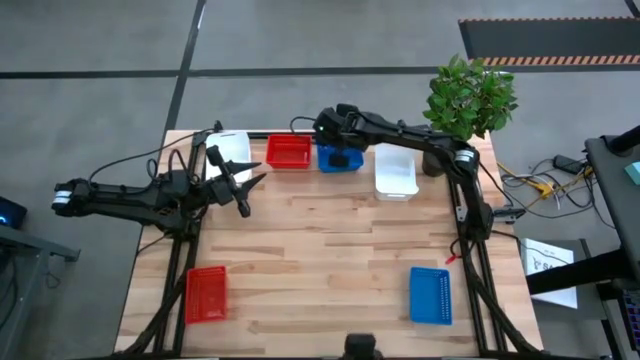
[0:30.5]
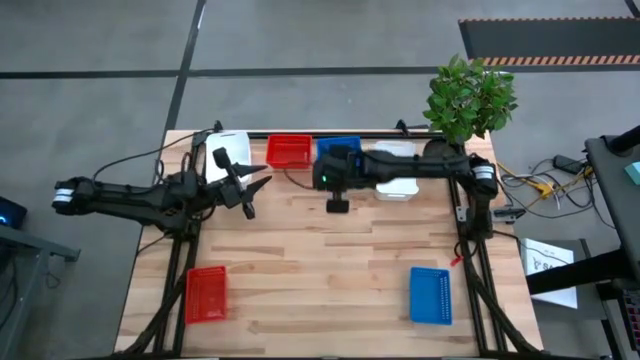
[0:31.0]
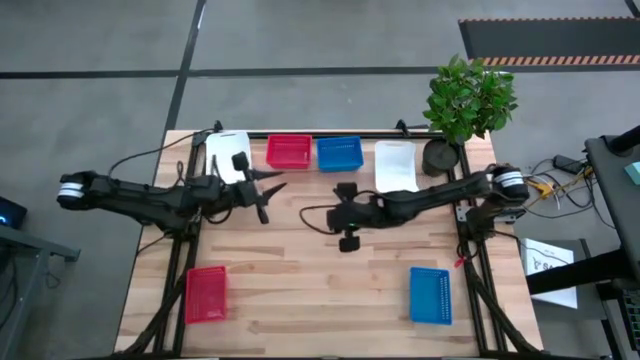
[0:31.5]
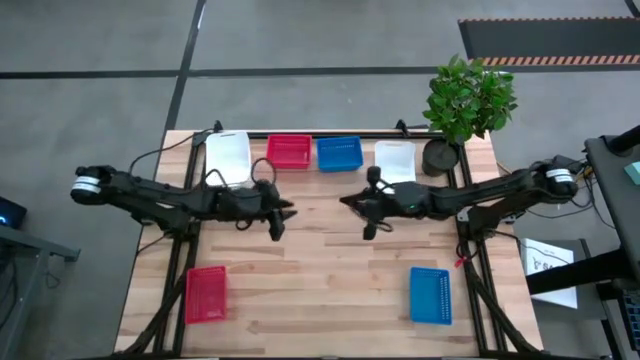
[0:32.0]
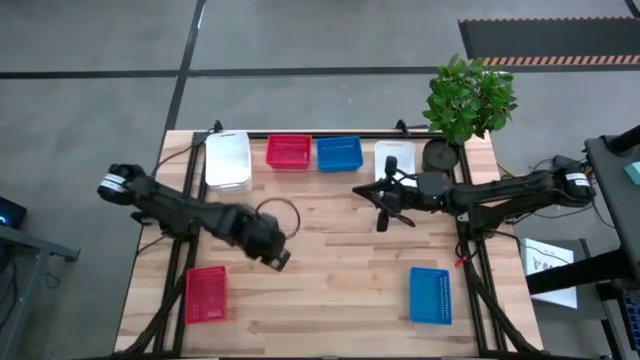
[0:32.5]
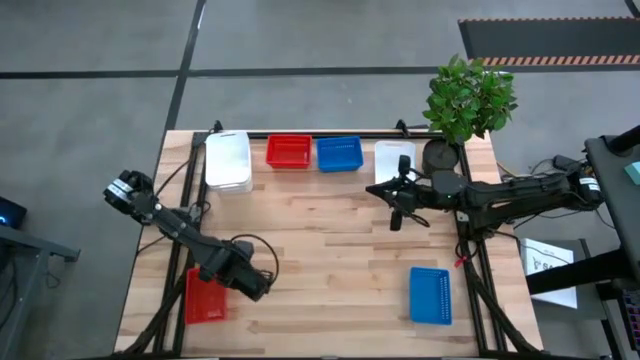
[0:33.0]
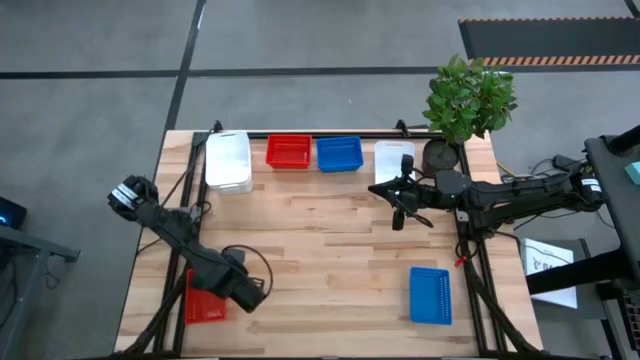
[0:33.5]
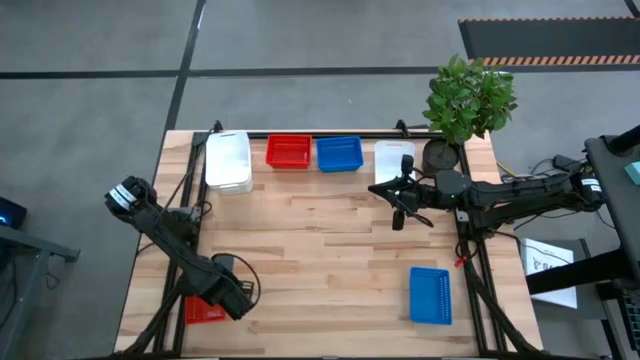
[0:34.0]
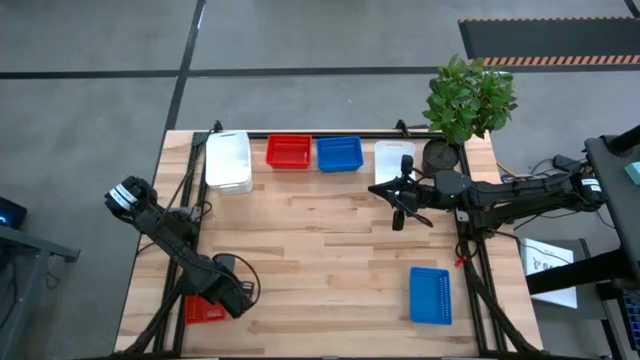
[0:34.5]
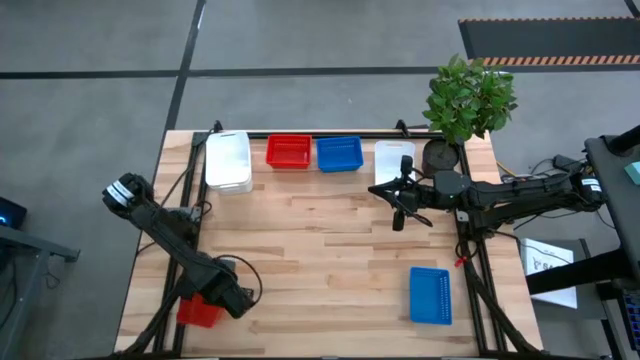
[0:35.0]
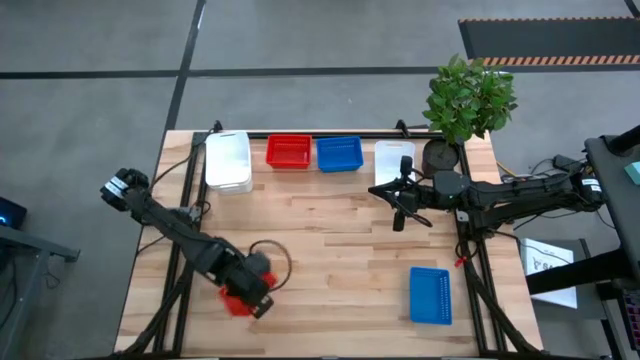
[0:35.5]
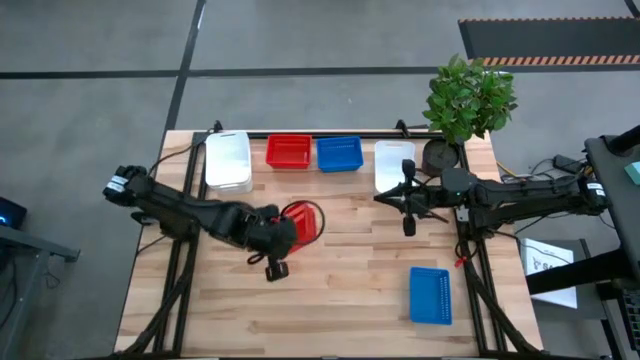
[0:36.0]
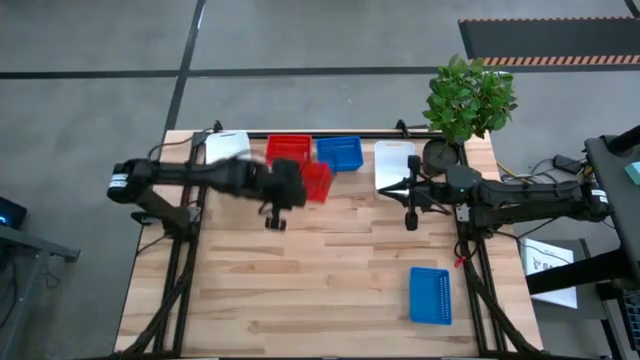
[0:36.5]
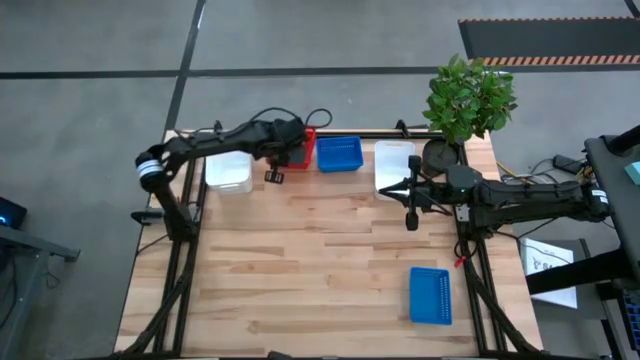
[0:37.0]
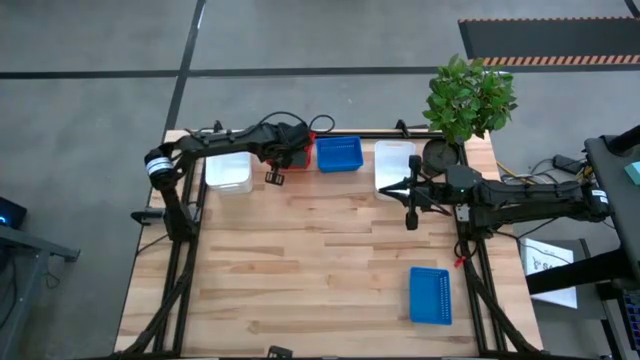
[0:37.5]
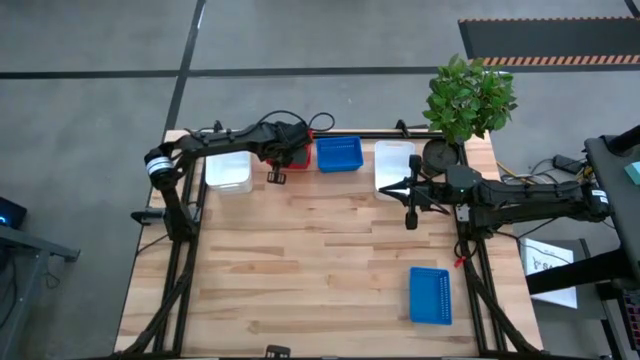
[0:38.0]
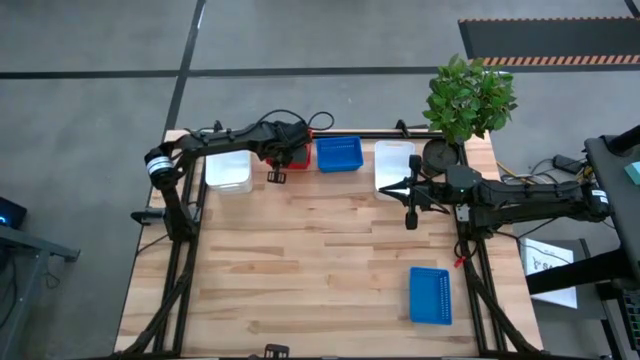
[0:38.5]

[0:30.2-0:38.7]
Stack the bottom red bin on the red bins

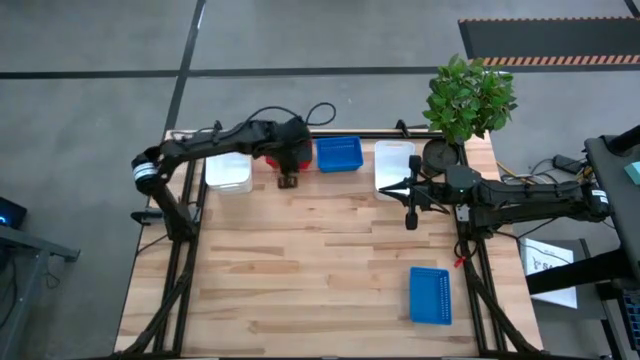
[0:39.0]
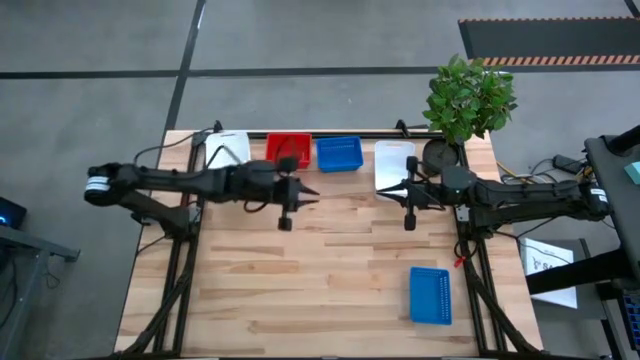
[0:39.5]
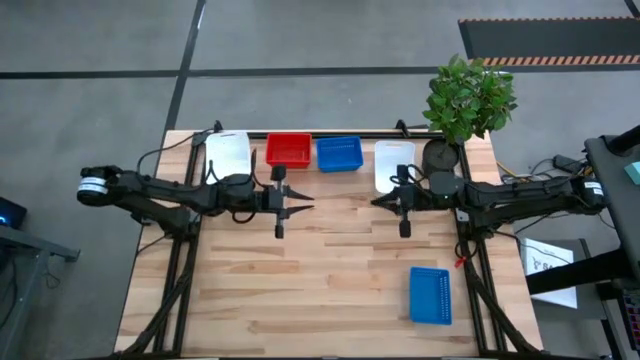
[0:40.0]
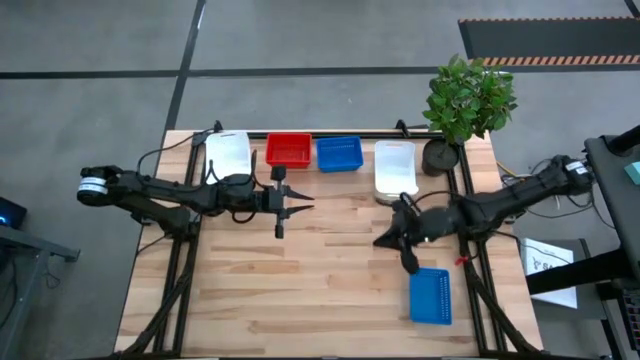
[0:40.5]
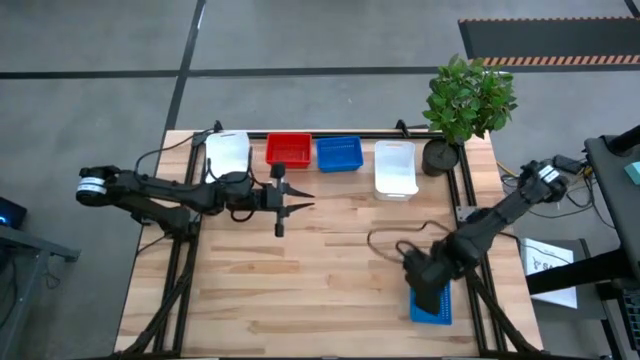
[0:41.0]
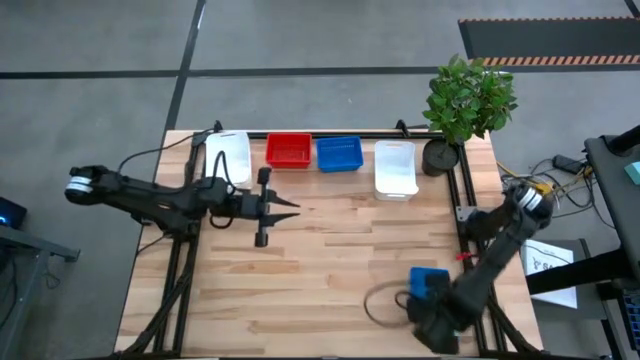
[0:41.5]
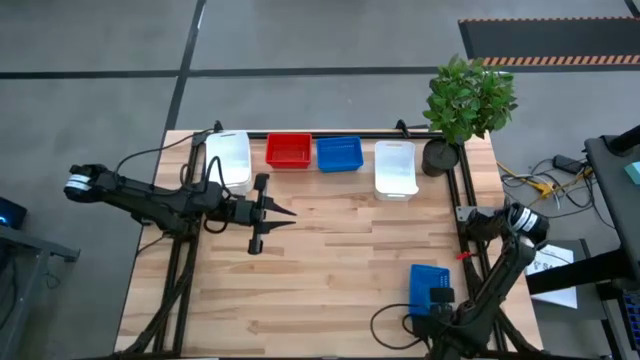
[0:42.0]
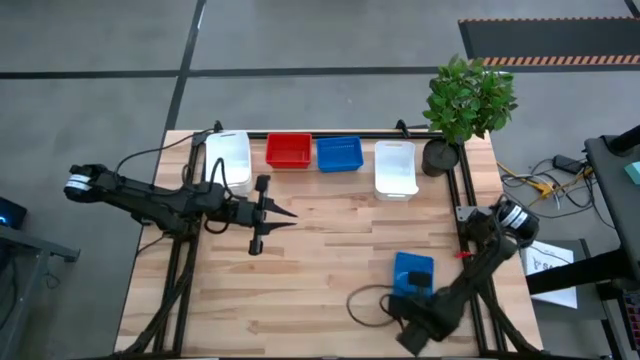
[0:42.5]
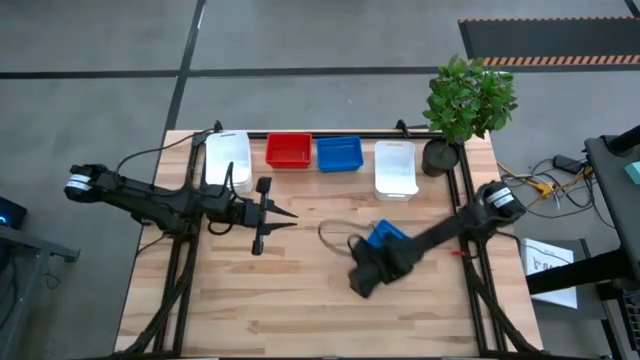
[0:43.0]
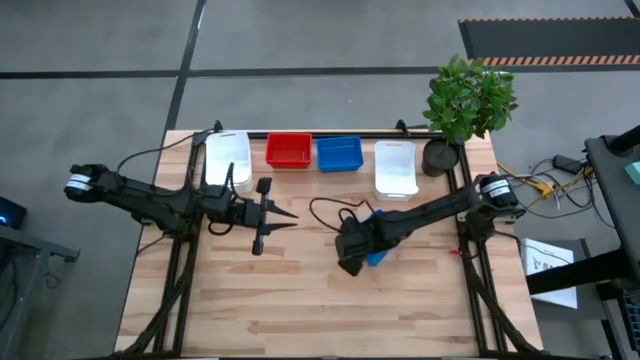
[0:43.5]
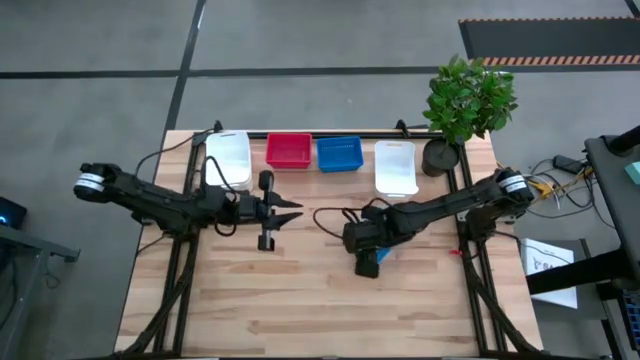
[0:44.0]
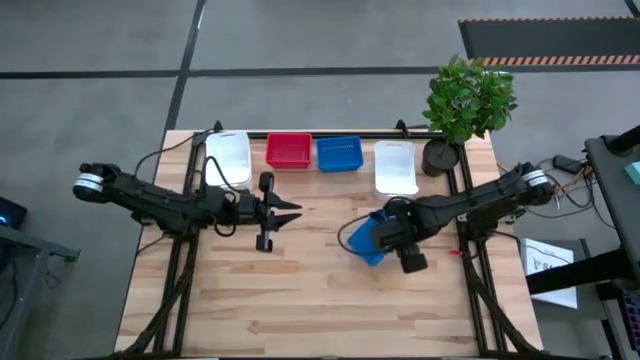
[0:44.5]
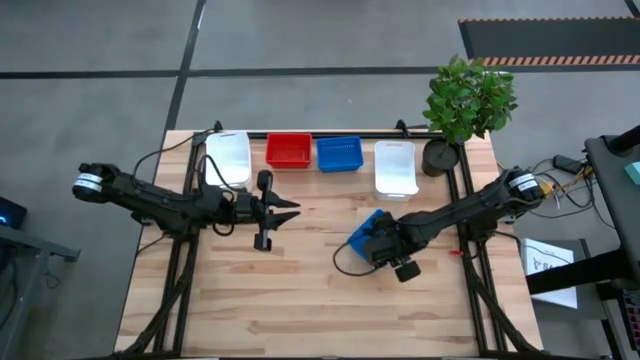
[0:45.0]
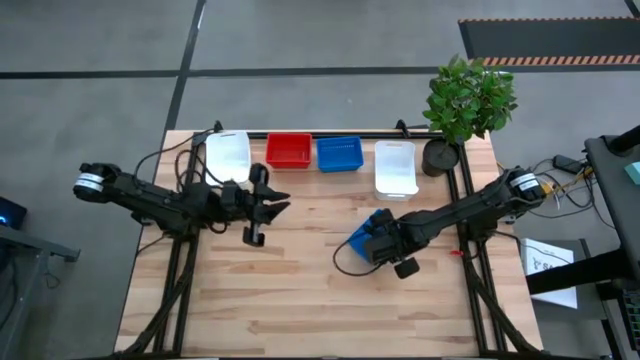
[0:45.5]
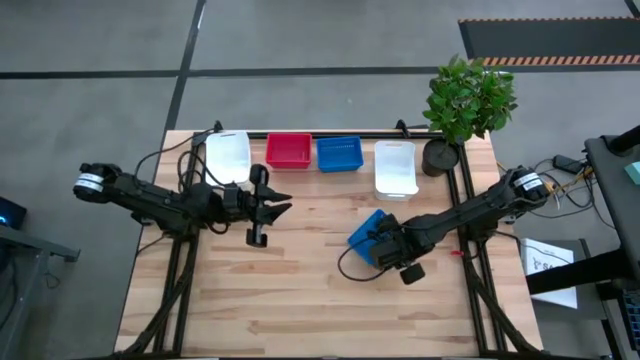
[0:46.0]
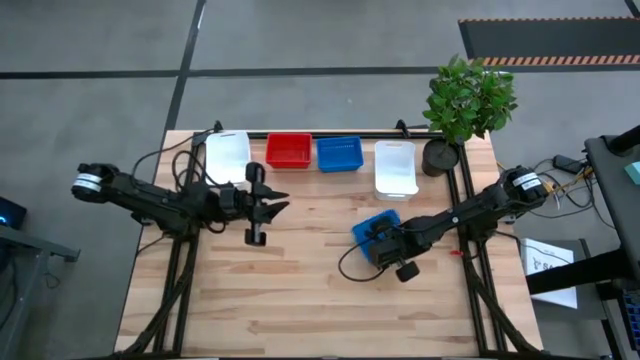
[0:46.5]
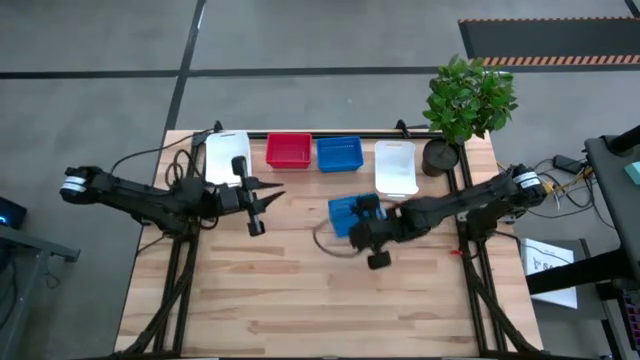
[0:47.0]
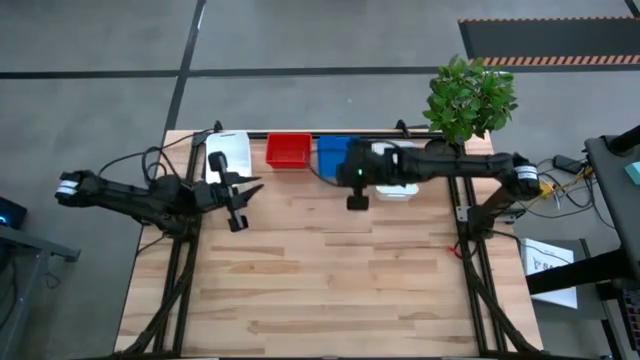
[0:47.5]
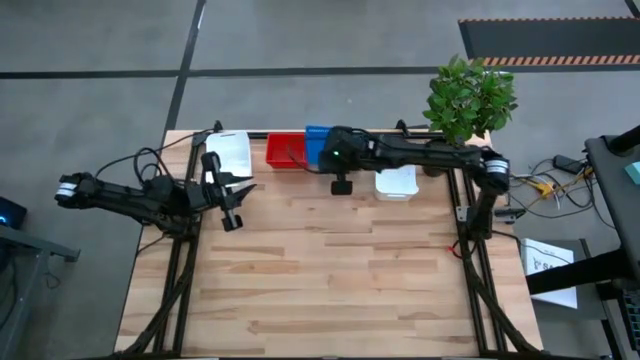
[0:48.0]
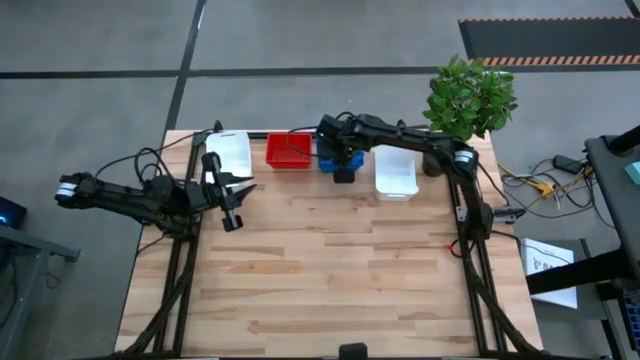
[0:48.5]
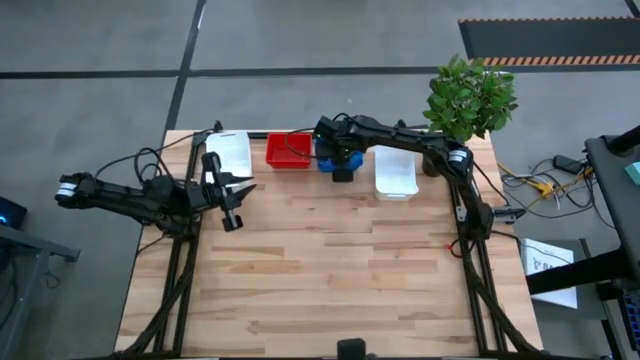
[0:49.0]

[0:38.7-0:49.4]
Stack the bottom blue bin on the blue bins

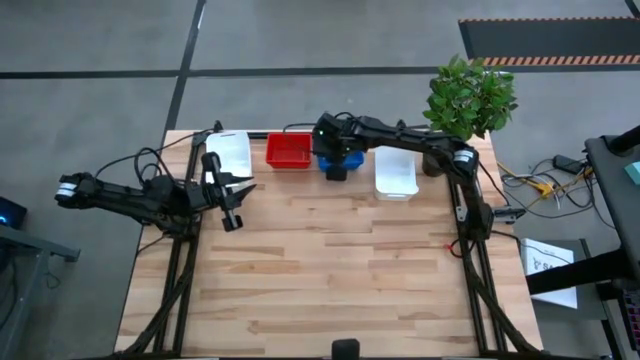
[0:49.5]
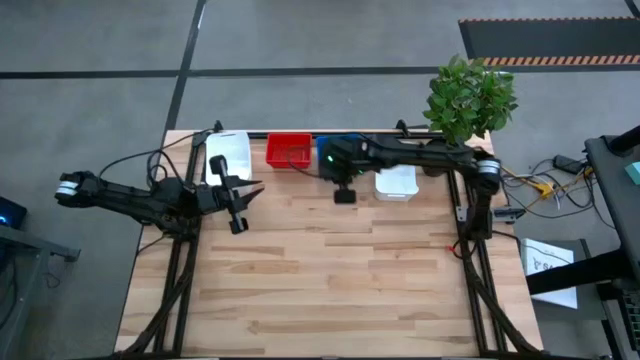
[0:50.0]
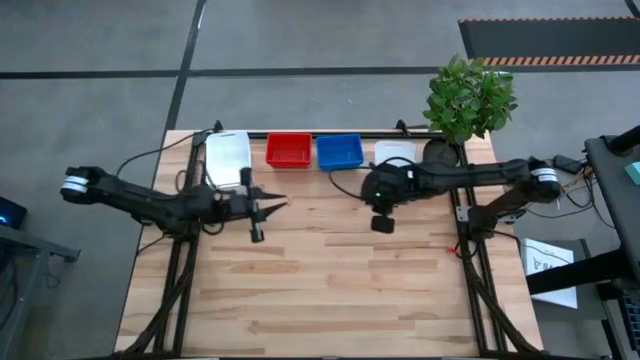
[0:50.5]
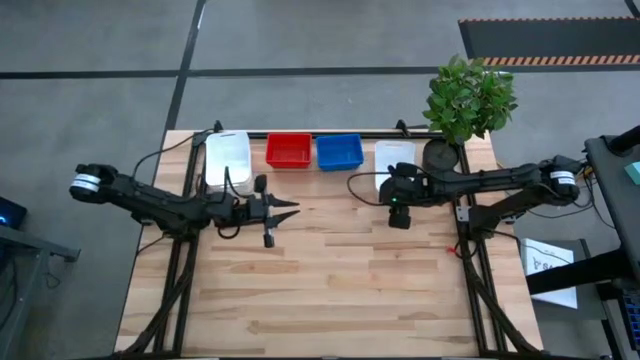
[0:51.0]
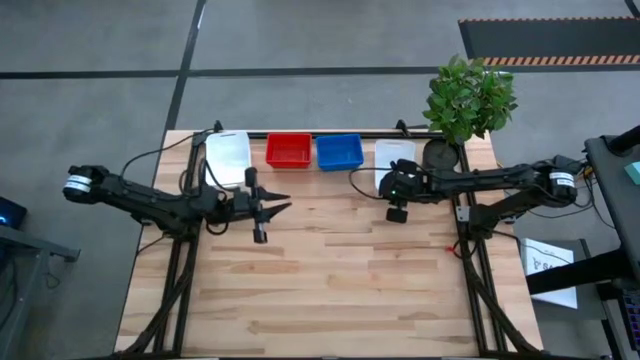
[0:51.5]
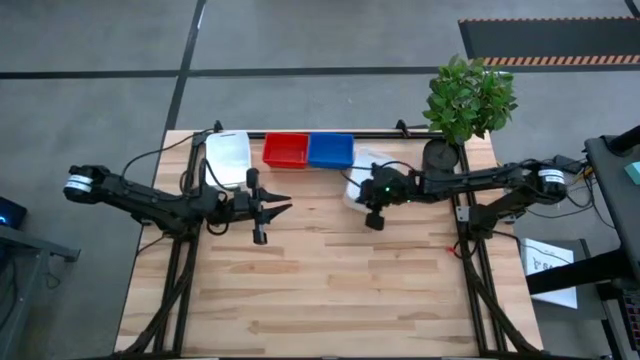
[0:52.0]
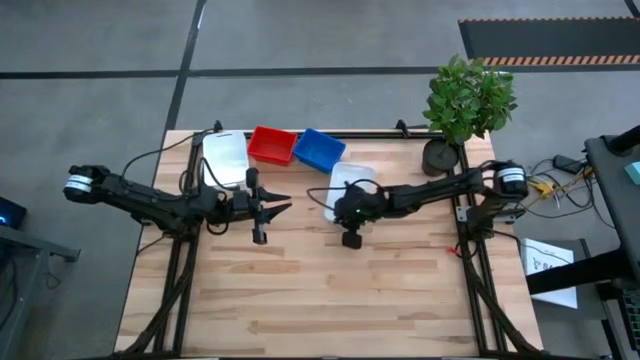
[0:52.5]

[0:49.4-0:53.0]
Move the white bin to the center of the table
